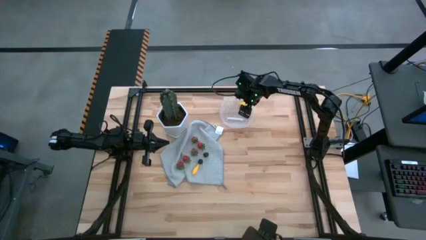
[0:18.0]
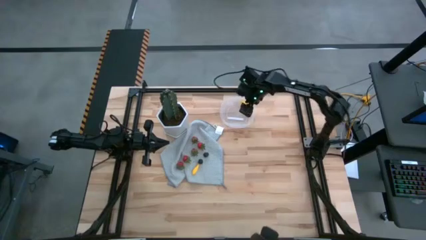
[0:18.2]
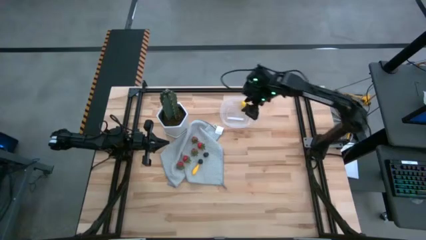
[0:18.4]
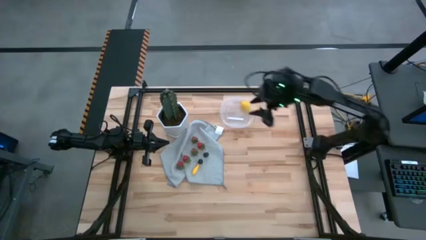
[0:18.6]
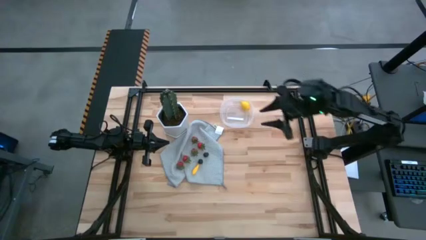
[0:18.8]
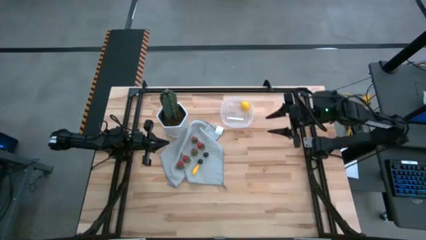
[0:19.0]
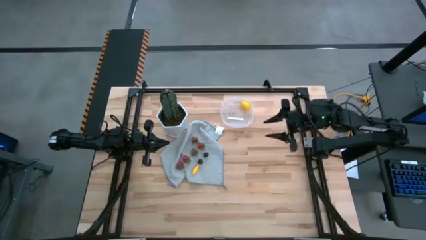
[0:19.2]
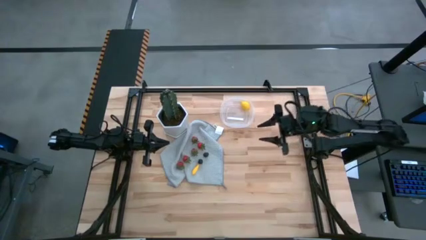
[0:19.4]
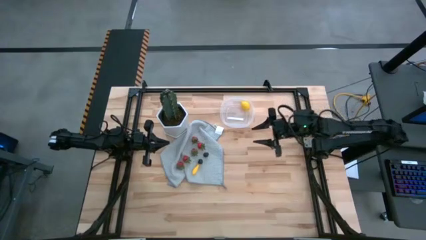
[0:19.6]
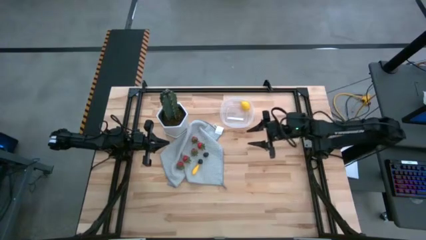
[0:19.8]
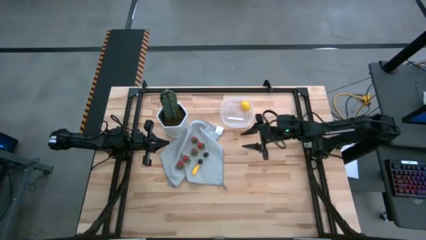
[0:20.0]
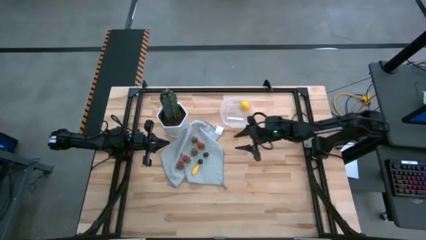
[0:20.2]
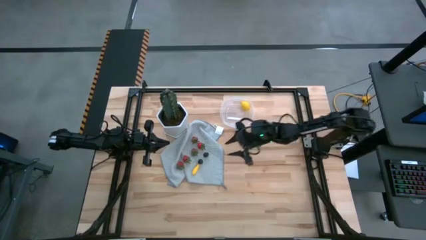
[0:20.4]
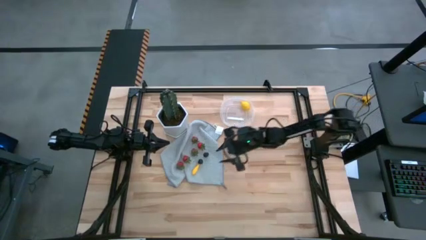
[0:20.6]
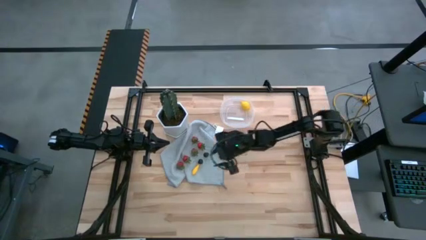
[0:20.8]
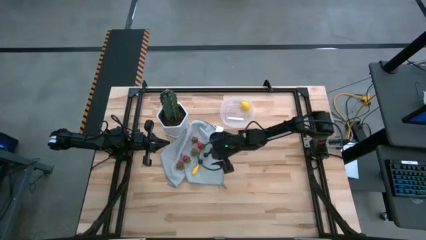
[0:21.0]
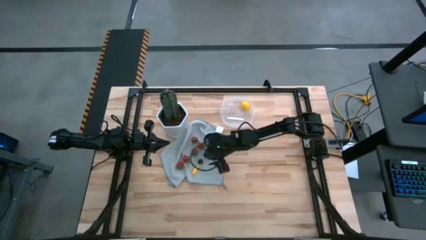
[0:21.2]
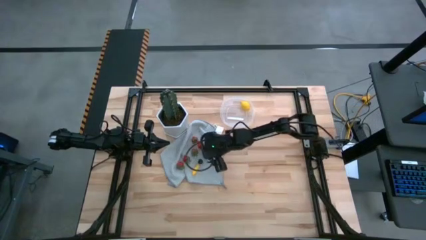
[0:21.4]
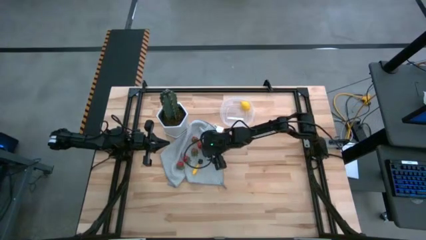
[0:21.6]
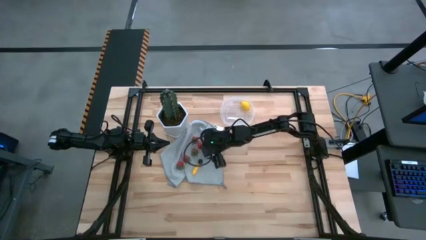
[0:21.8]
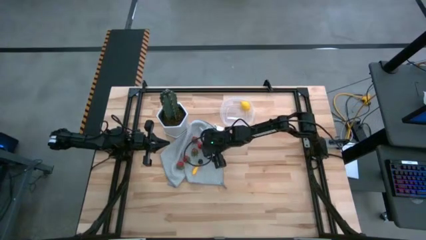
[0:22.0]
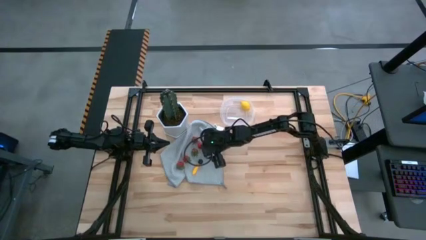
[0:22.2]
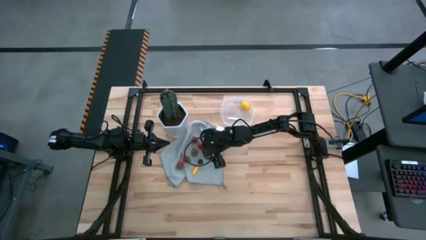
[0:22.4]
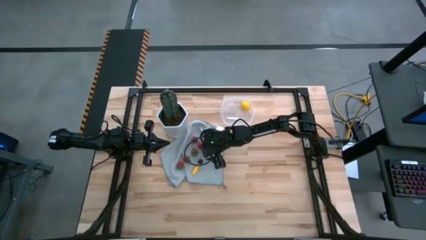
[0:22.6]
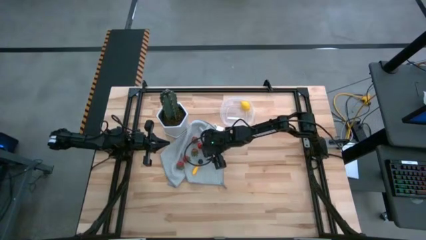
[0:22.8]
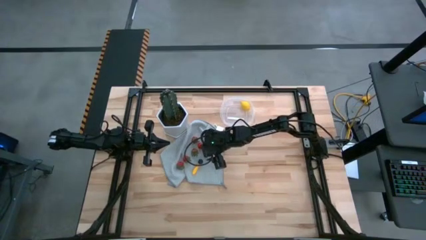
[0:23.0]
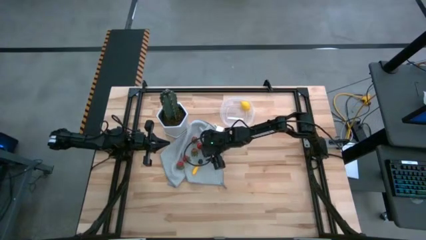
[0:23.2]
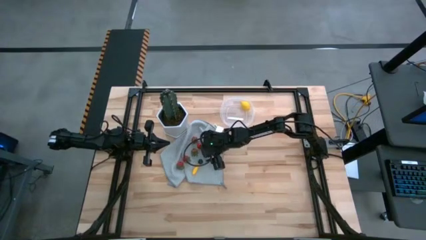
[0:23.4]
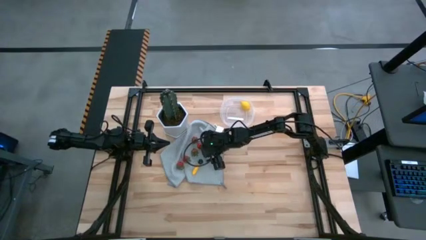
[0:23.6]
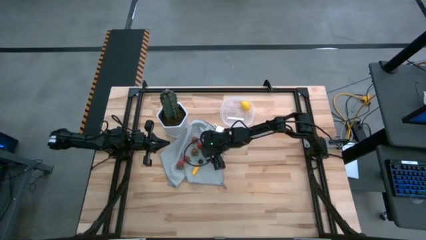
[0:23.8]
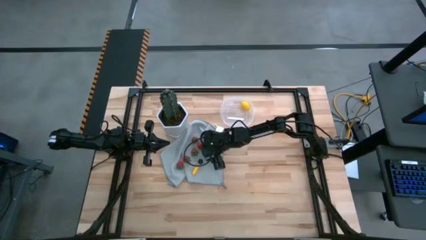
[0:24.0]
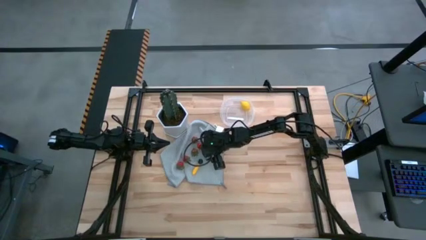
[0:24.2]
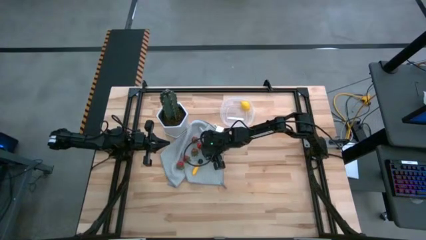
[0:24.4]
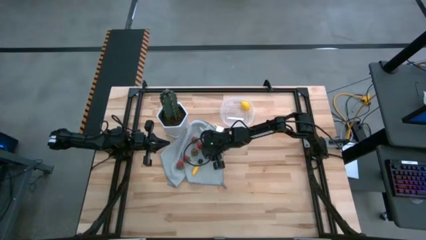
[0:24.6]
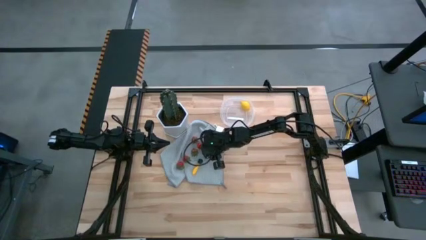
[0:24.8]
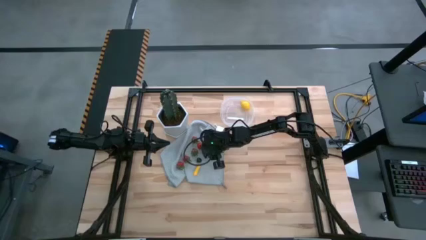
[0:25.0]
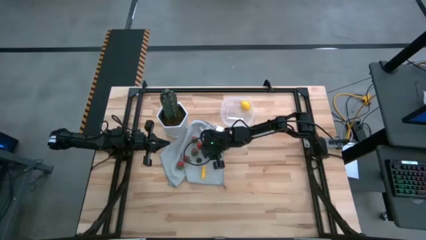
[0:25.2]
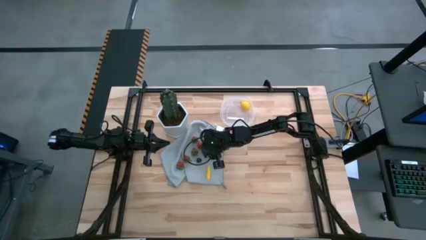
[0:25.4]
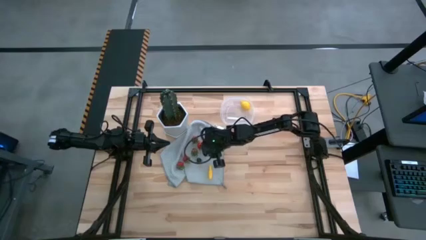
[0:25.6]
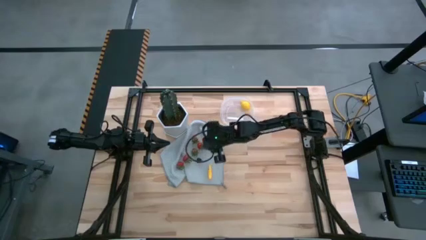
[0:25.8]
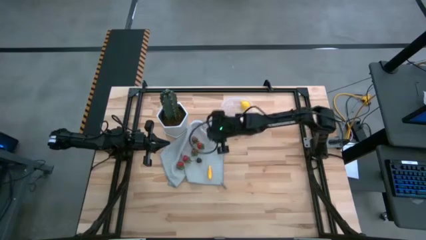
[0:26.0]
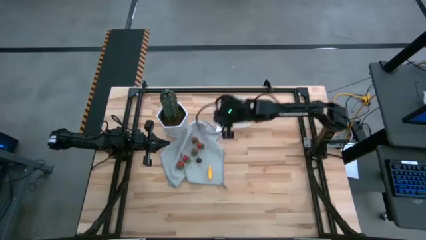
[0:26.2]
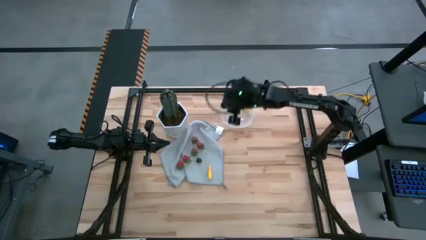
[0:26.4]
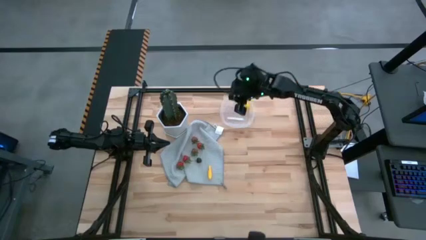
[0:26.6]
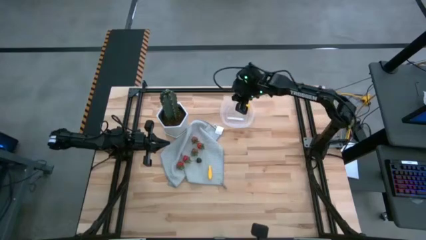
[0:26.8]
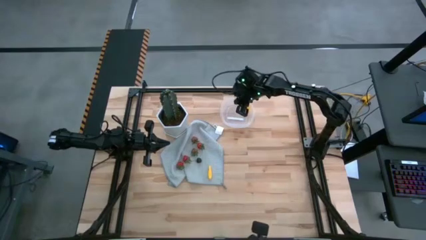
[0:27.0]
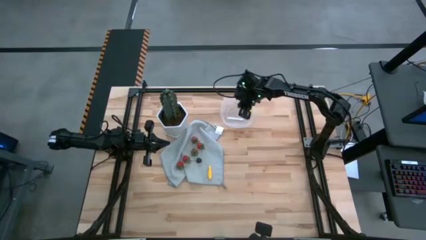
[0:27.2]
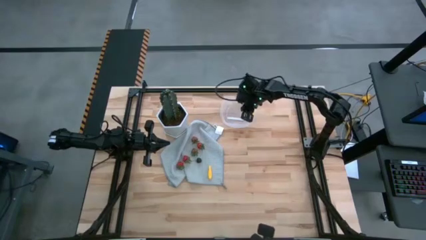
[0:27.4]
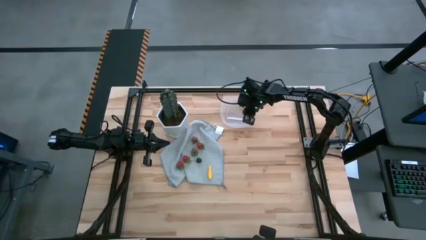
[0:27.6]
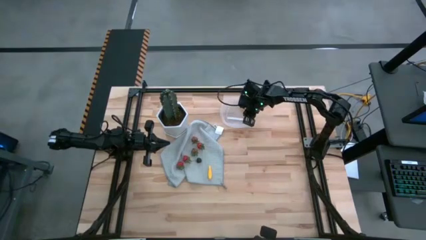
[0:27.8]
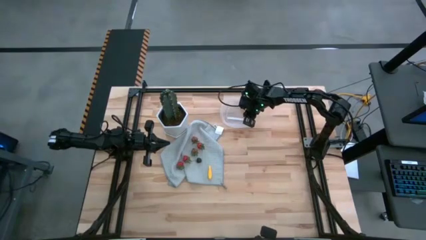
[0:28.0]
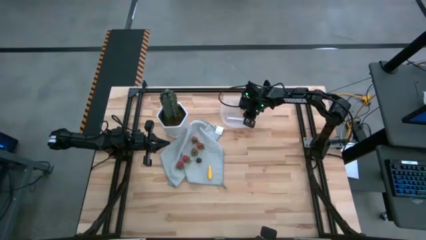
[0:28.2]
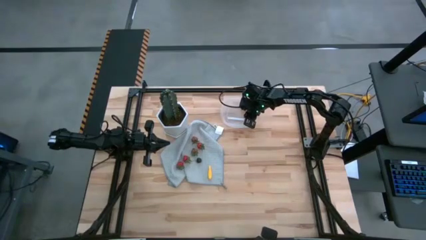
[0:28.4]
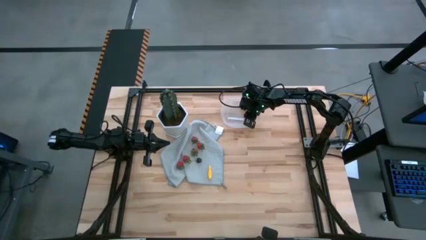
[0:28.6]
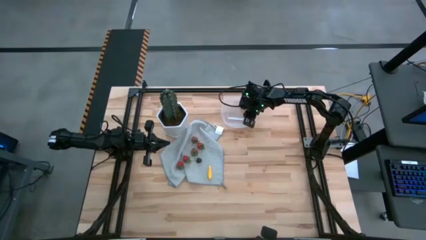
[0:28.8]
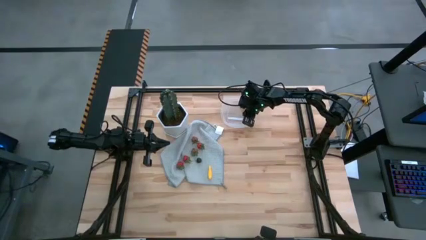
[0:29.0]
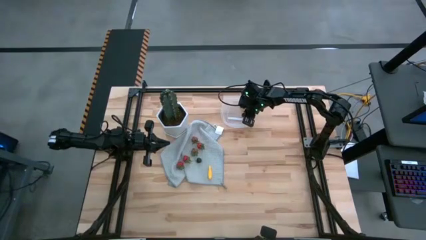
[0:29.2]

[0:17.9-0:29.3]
Task: Pick and placing Produce into tupperware
Put the black blackberry into the transparent bin

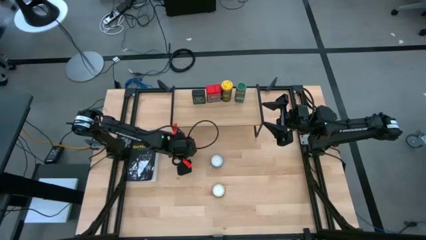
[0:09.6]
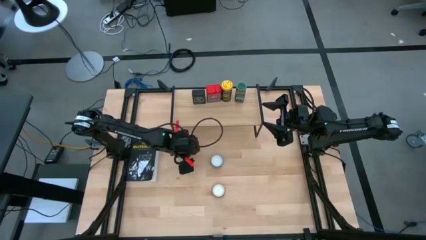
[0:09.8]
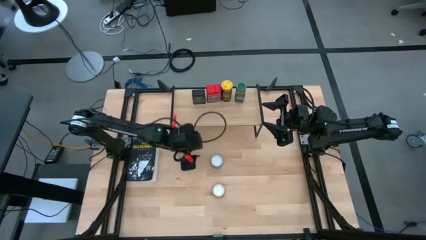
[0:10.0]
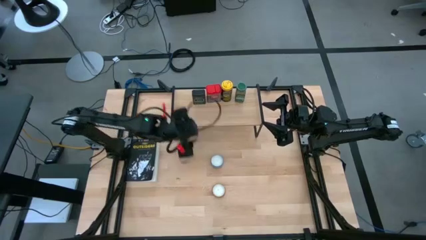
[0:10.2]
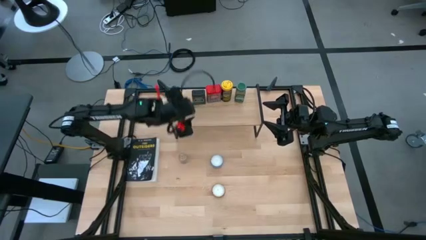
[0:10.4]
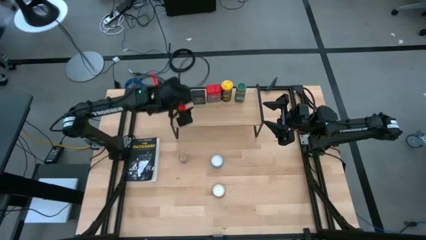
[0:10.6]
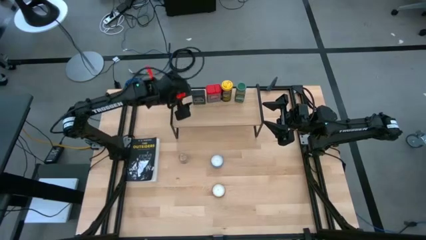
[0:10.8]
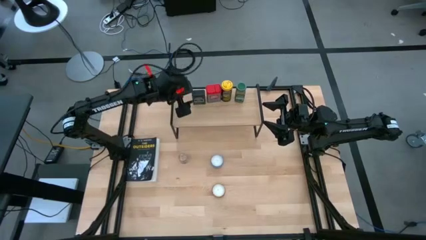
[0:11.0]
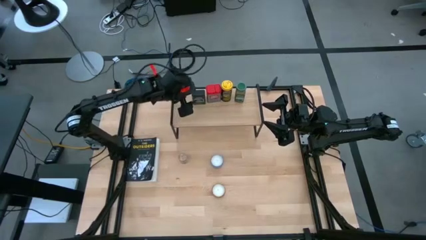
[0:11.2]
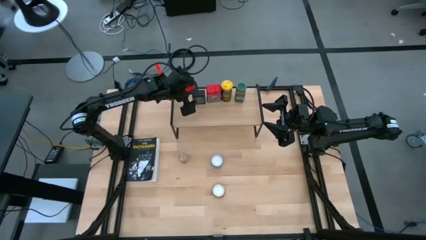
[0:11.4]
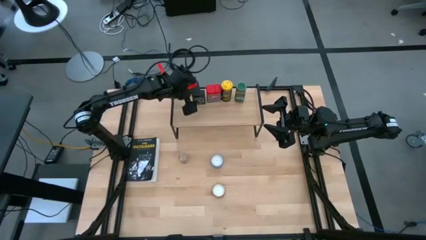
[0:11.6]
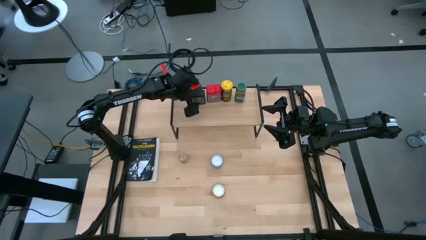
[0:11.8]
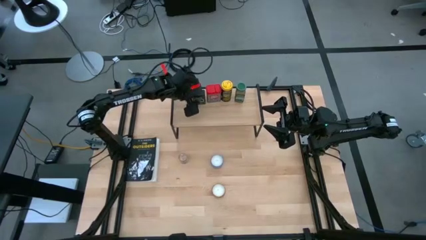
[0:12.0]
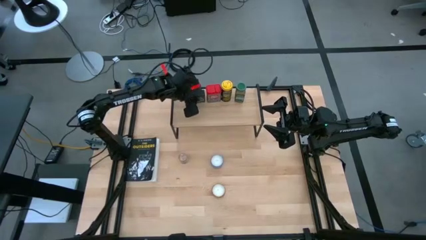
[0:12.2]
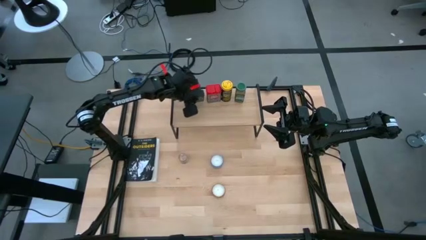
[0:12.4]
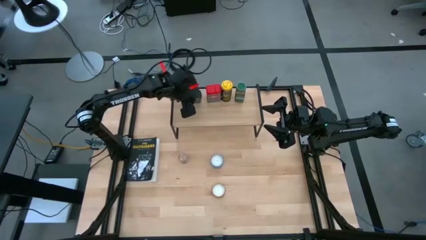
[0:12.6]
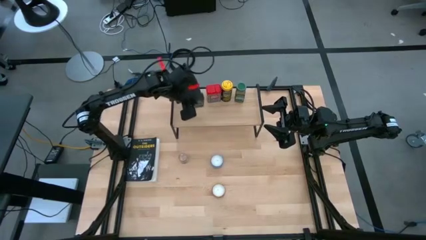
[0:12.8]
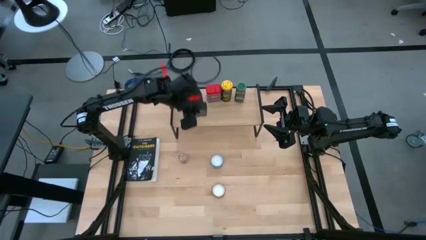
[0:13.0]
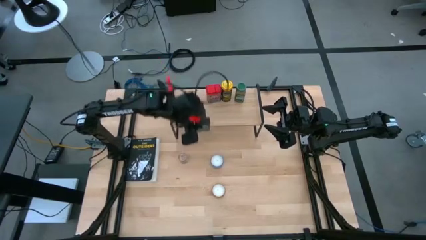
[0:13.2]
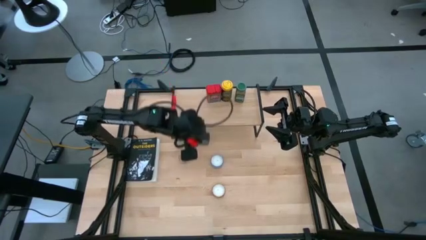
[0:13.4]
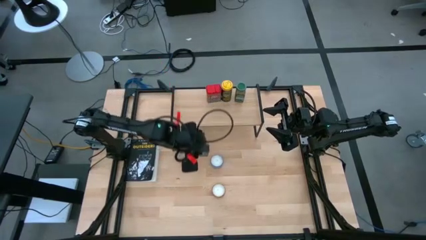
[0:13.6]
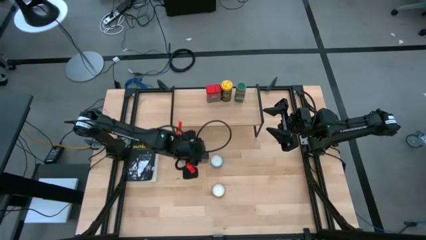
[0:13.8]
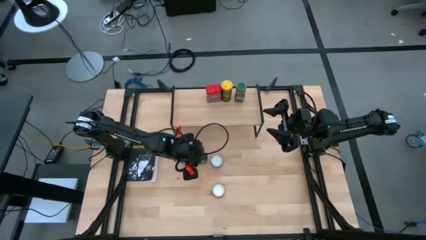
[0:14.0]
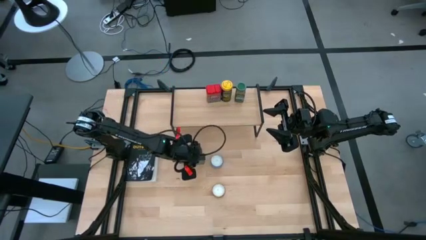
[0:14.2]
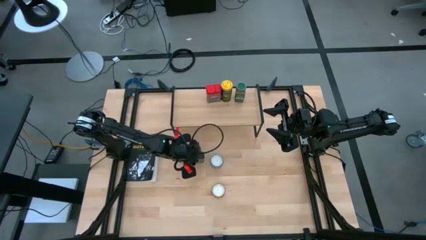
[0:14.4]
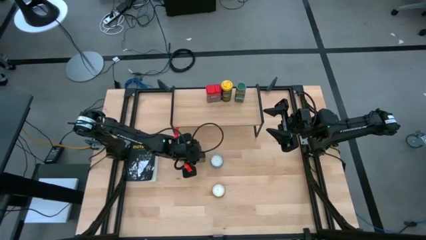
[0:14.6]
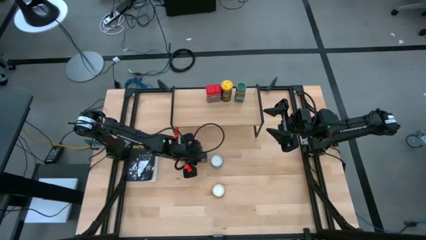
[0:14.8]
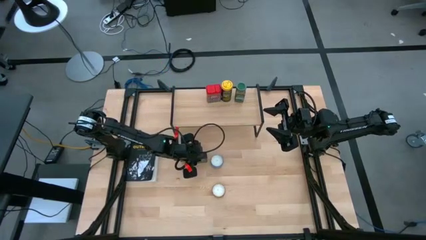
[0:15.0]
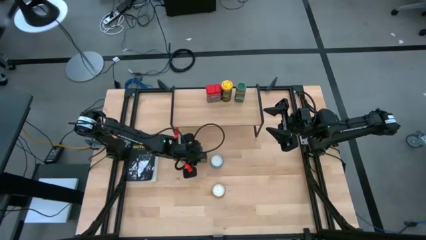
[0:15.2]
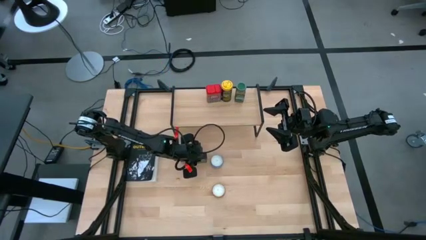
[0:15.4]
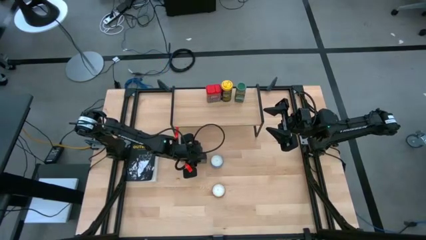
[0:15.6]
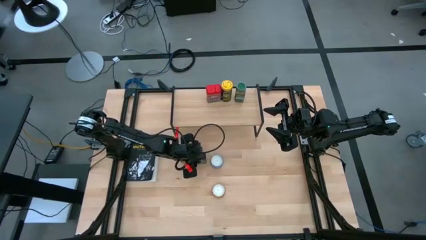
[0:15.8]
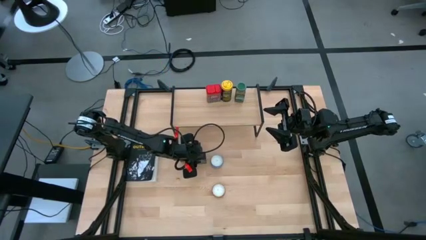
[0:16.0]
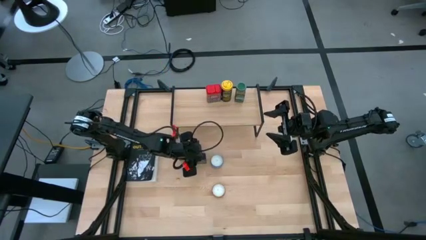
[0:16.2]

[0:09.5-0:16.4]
Task: Shelf spices
Remove the black seasoning can from the shelf
